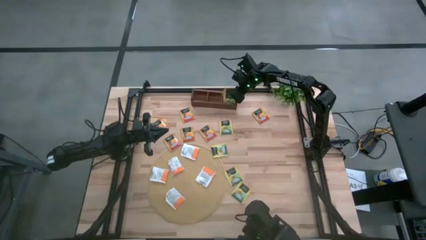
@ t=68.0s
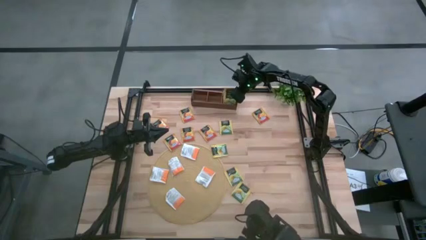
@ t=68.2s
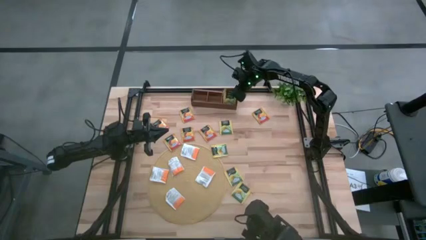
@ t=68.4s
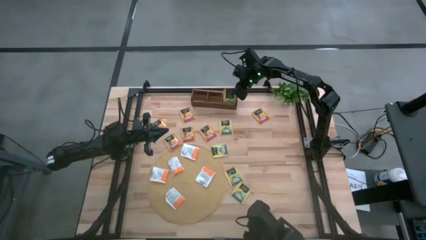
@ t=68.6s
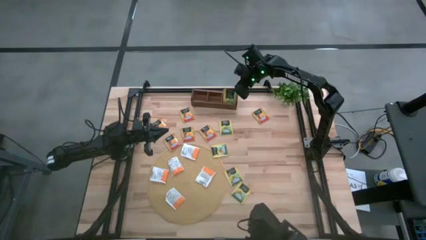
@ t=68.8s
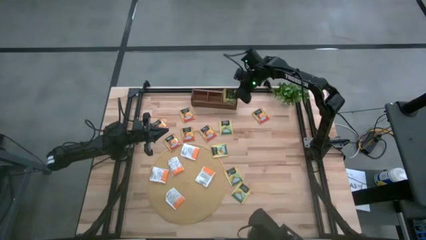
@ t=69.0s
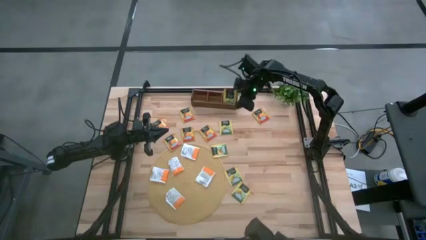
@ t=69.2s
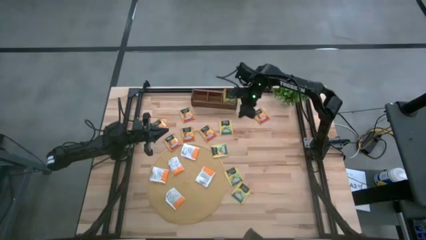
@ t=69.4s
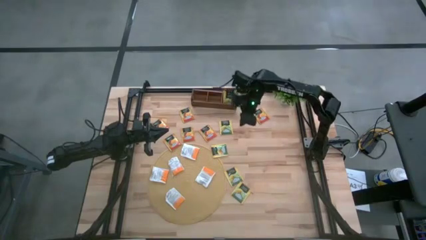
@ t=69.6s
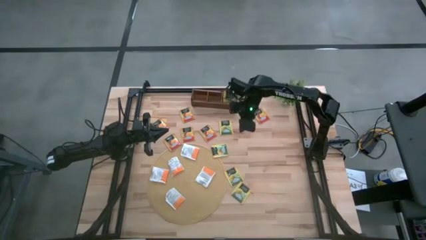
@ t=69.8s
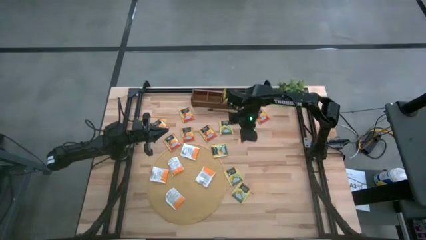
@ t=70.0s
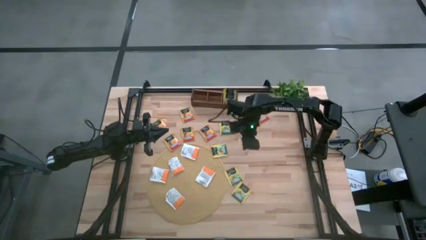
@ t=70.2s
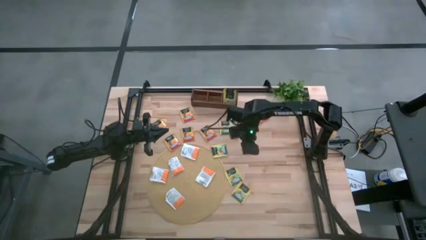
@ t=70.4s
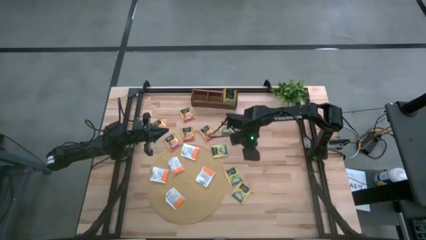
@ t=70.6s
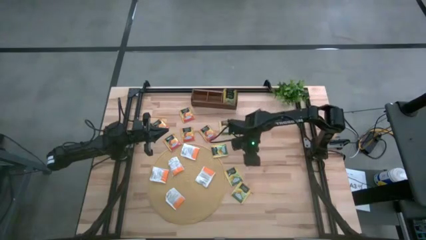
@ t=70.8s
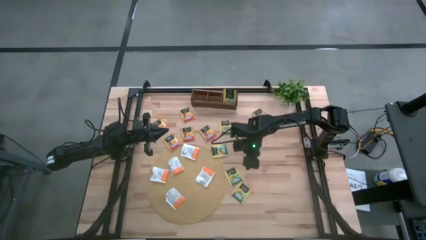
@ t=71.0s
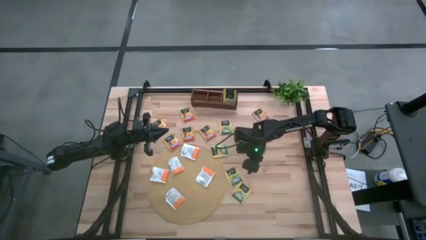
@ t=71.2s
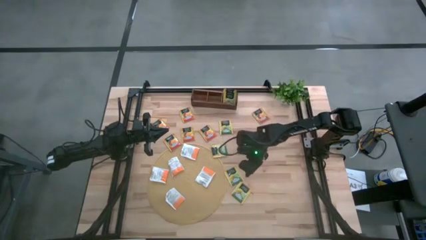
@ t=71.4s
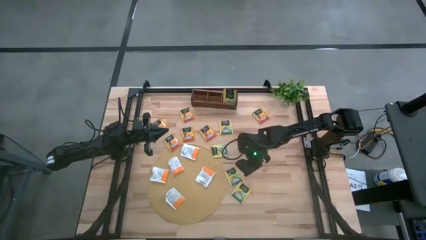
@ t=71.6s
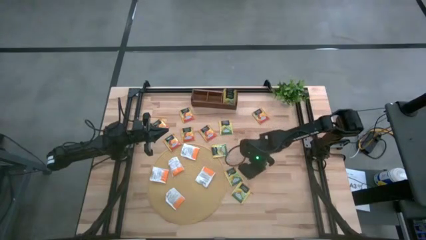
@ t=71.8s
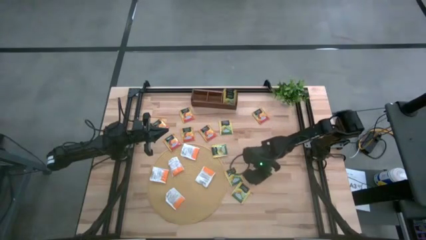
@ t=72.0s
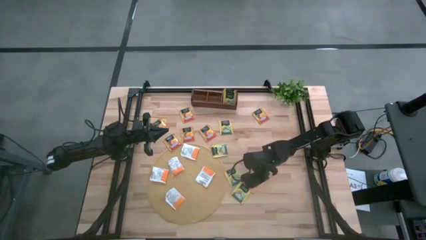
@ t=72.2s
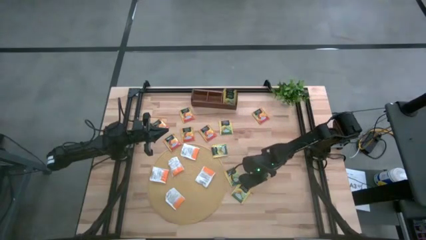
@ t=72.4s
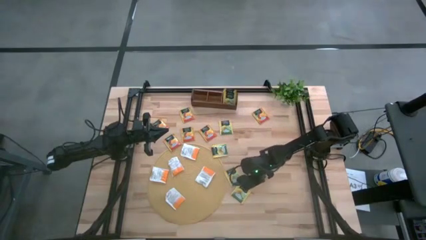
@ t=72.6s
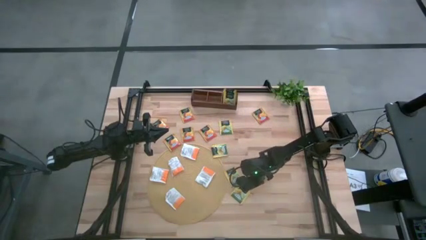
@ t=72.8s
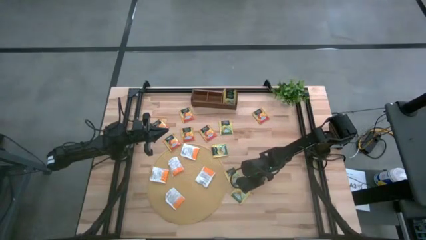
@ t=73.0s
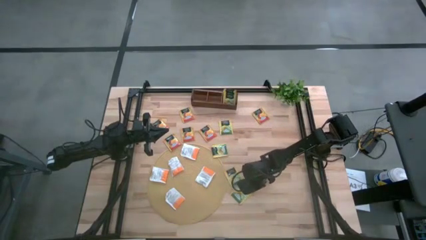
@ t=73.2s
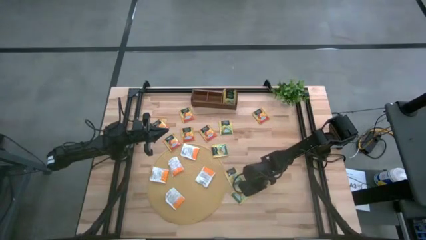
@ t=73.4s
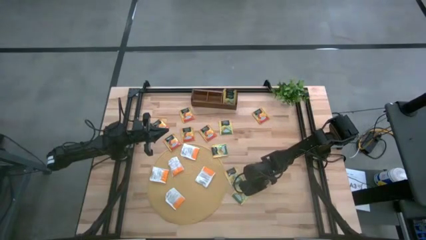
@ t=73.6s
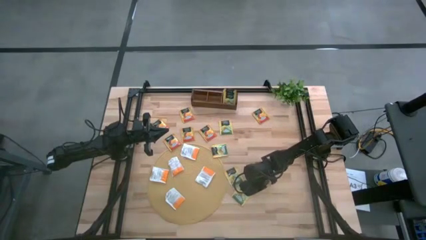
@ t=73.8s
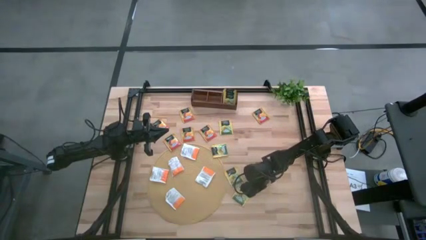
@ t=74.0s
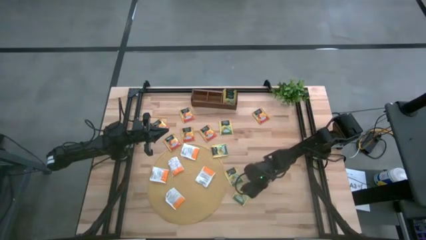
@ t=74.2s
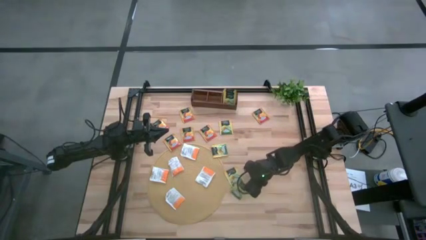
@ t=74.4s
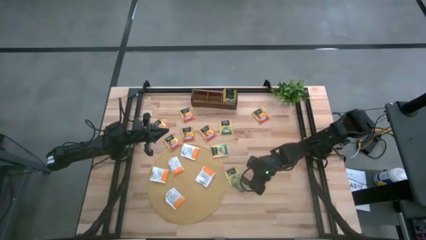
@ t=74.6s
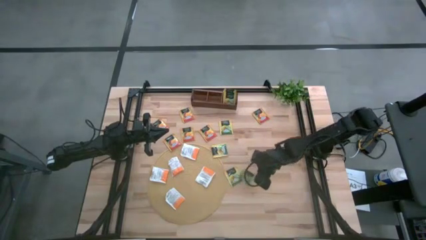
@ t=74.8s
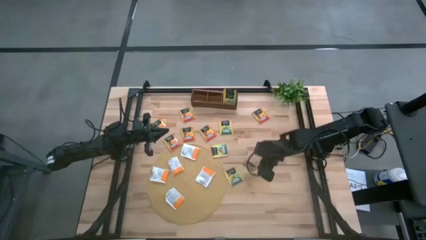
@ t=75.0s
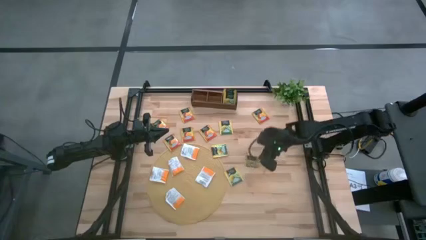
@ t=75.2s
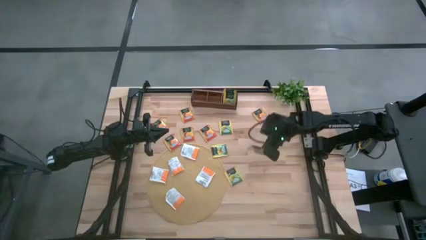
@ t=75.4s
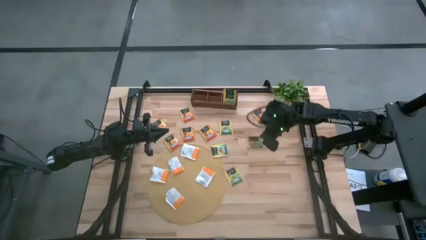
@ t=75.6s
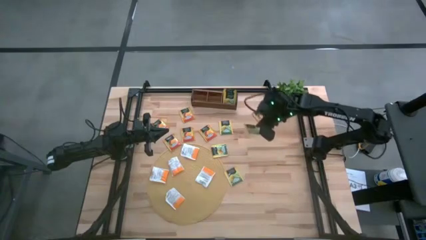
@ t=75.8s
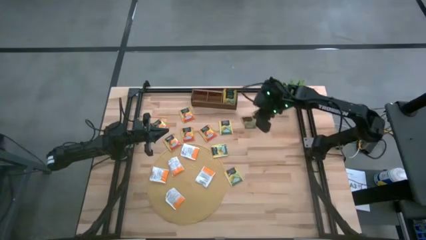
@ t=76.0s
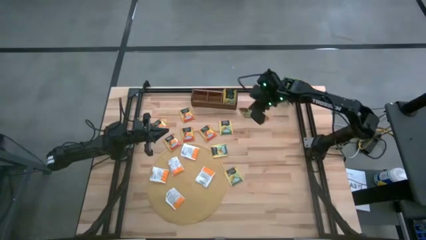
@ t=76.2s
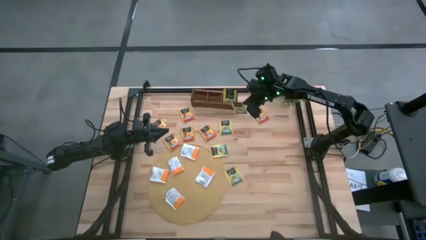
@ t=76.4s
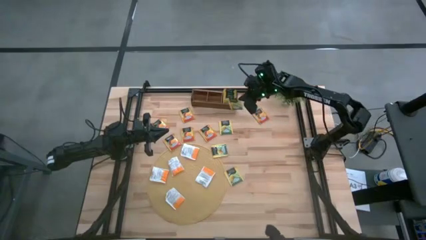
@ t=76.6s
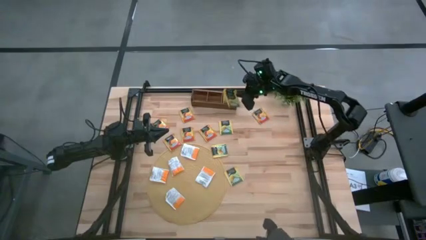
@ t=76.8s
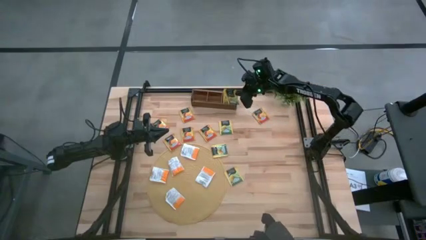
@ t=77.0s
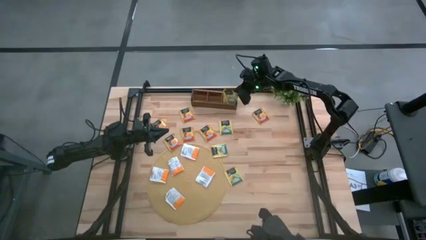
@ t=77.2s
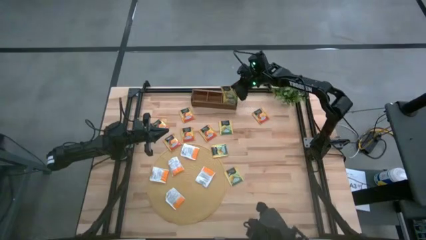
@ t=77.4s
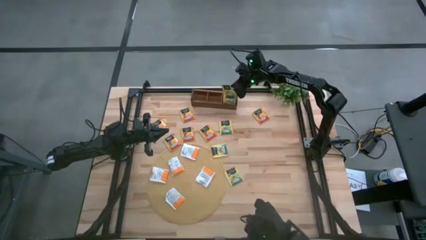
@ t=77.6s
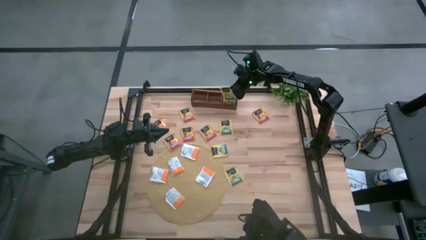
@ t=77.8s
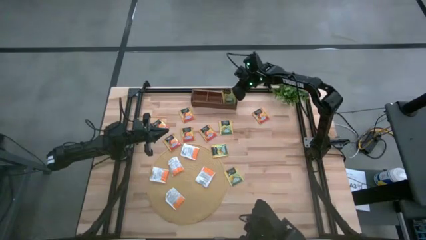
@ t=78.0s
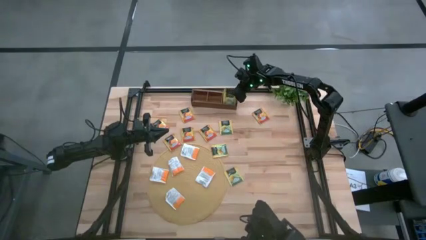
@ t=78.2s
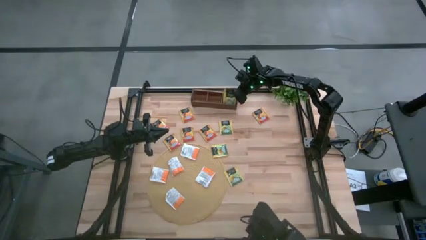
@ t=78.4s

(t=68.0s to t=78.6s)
Task: Pick & Place Tea
Put the green tea bag into the right slot of the wooden organizer

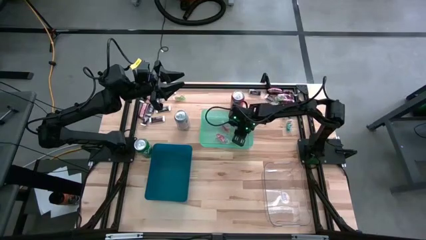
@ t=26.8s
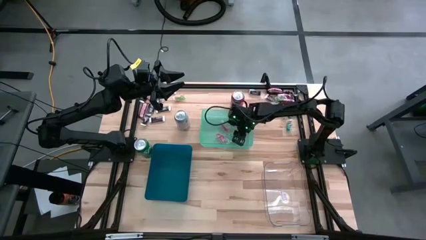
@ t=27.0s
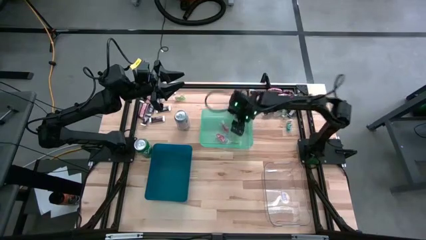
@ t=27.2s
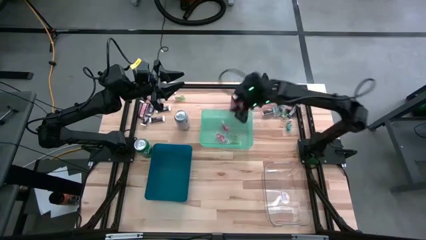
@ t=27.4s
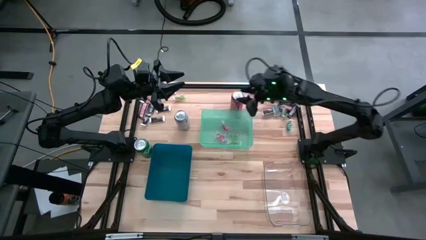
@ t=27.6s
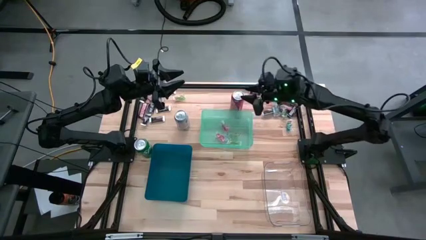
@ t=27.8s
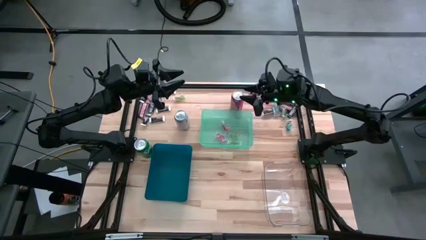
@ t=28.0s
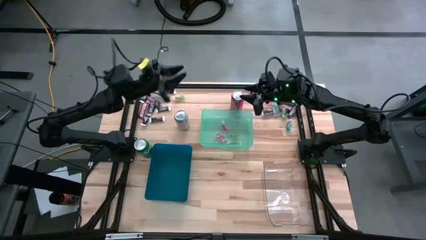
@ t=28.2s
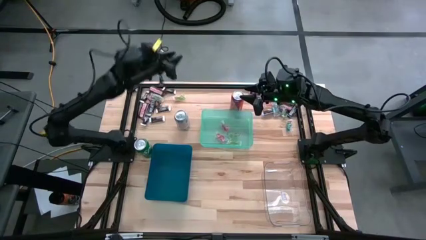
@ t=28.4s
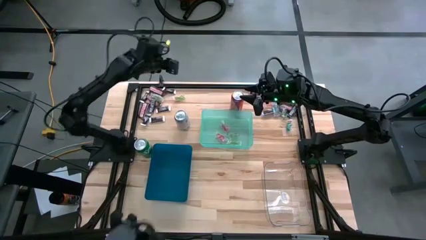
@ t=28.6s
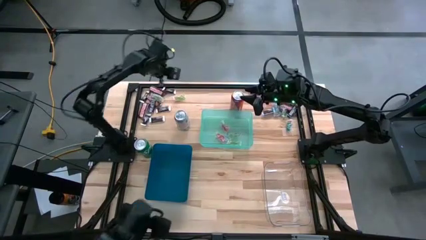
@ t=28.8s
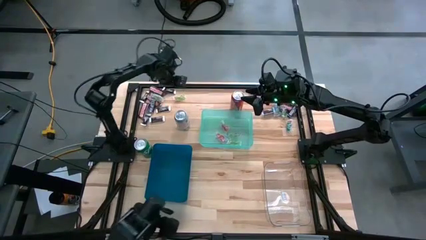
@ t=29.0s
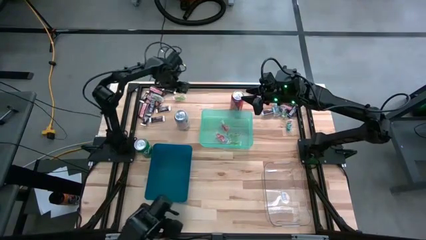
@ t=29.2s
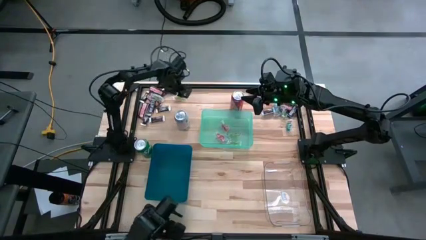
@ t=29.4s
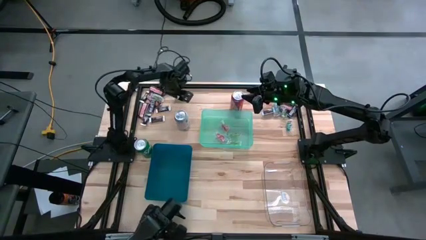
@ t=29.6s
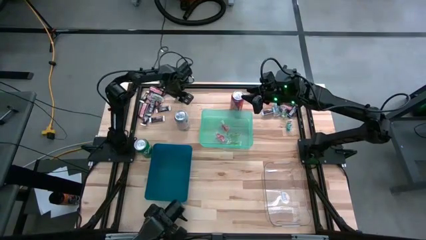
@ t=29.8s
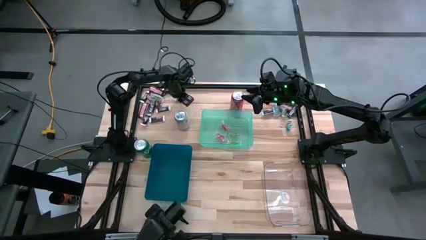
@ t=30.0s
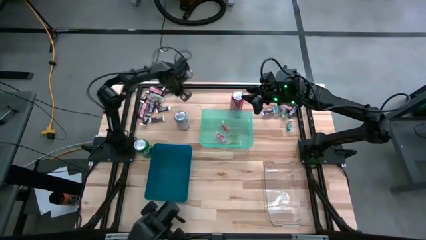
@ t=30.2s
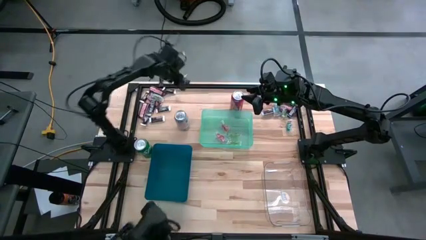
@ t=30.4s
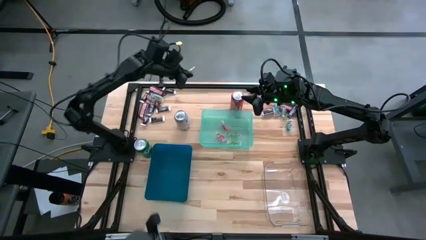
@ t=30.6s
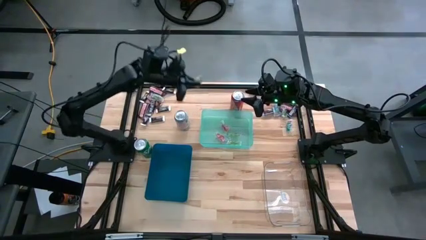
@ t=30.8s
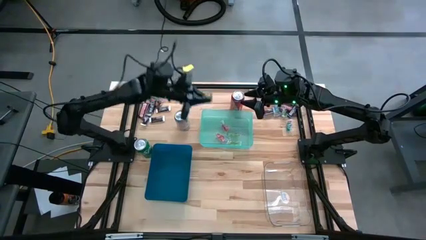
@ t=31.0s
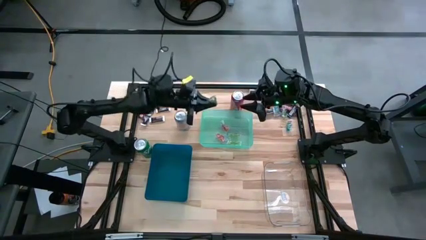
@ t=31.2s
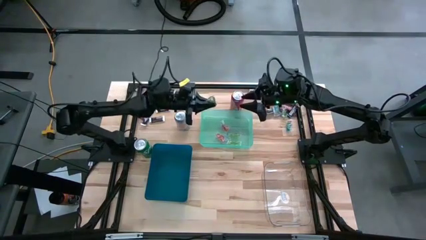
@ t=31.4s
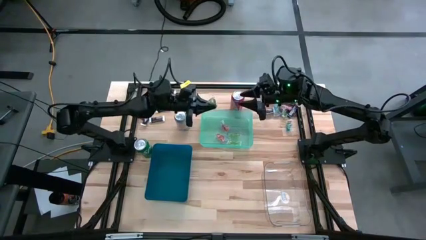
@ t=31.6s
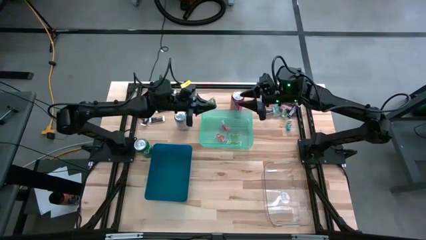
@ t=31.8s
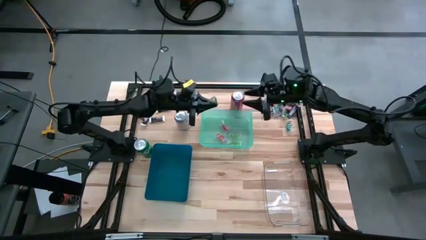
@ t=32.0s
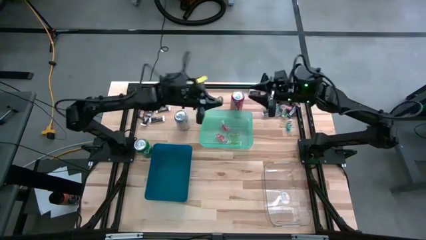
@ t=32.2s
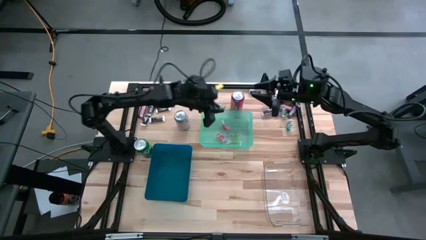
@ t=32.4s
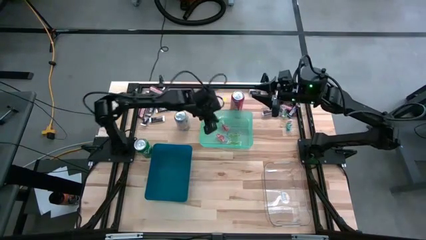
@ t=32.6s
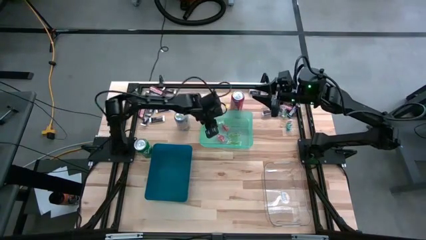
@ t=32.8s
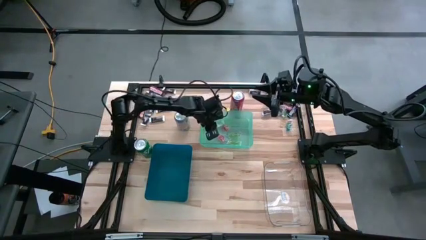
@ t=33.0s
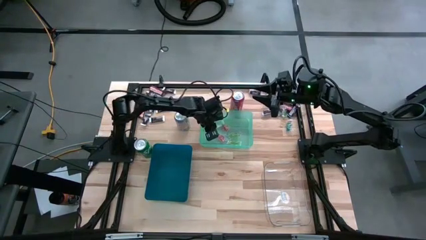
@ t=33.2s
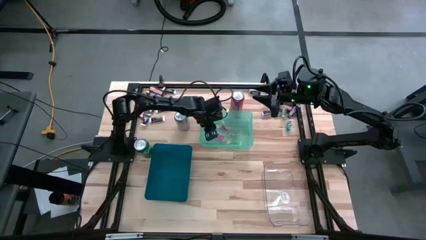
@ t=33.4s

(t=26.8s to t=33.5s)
Task: Organize candy in baskets
Put the green gummy into the green bin
